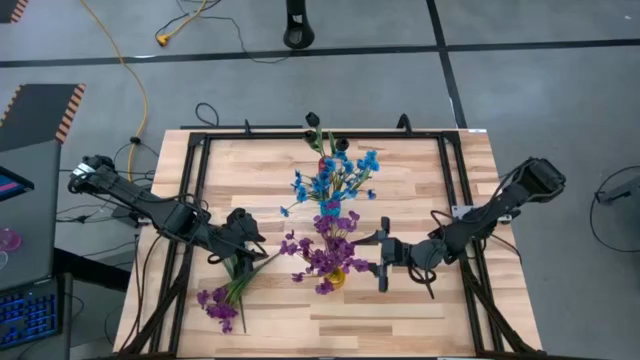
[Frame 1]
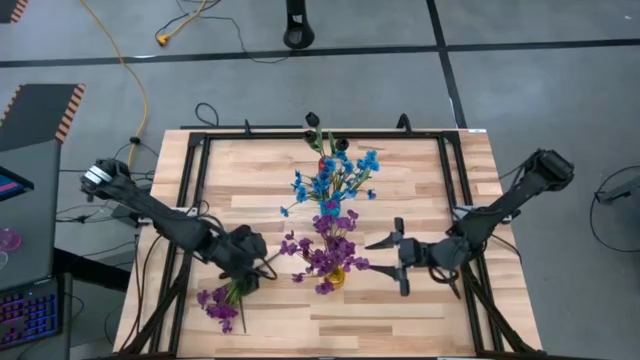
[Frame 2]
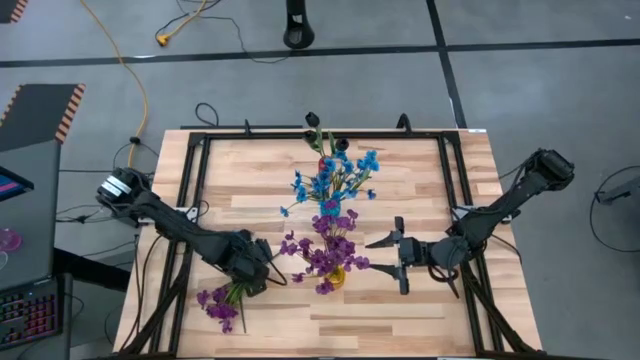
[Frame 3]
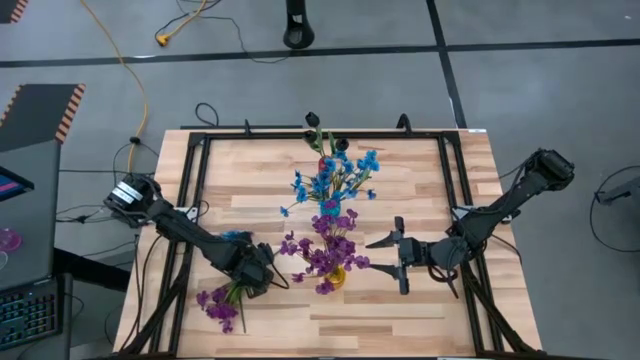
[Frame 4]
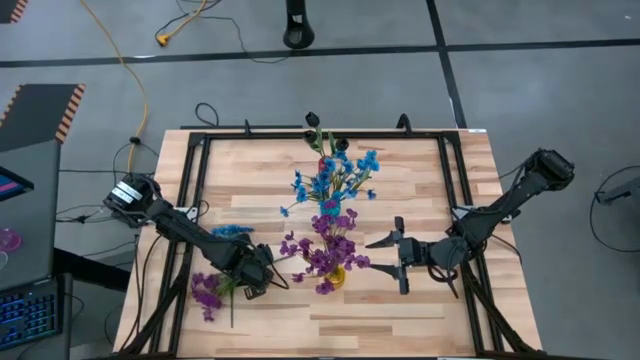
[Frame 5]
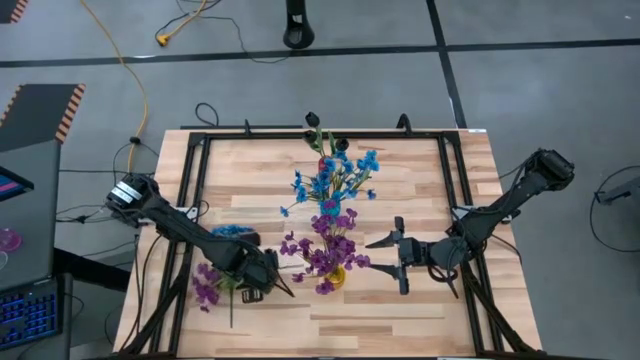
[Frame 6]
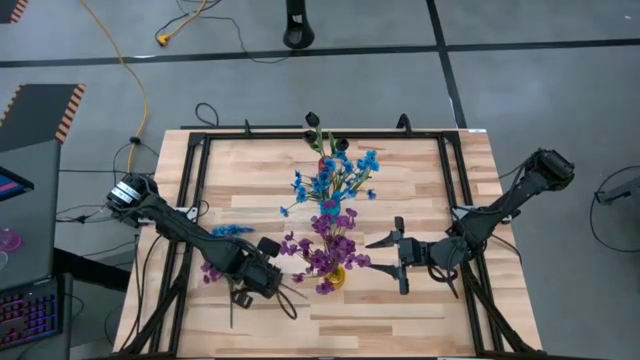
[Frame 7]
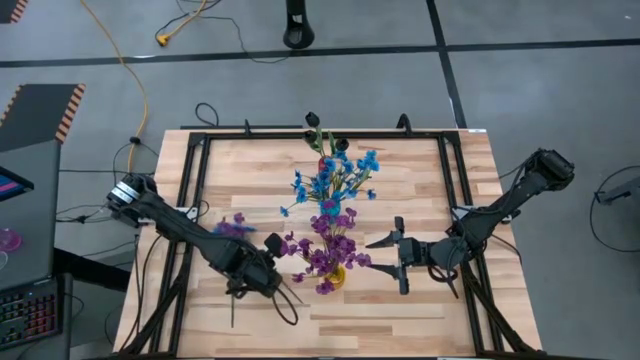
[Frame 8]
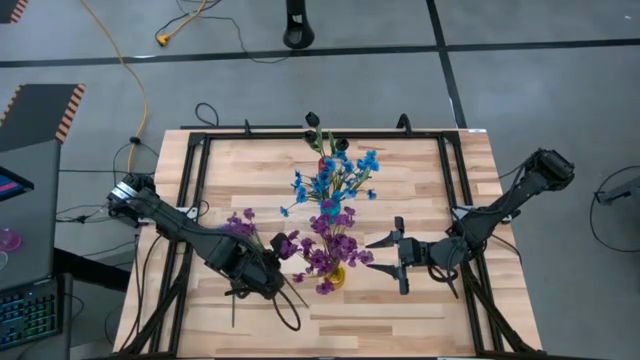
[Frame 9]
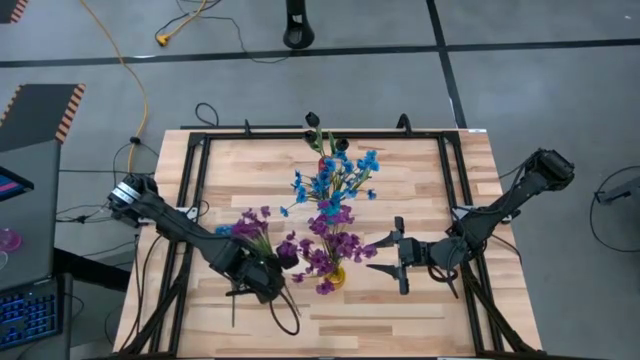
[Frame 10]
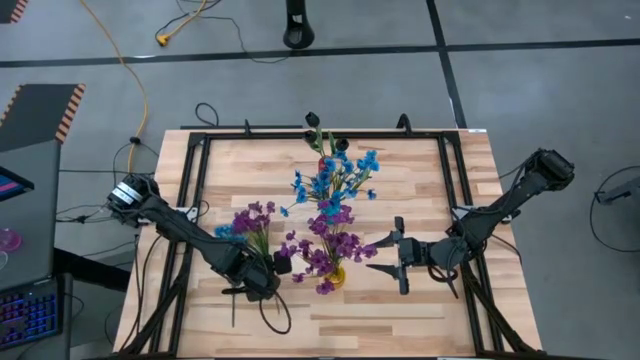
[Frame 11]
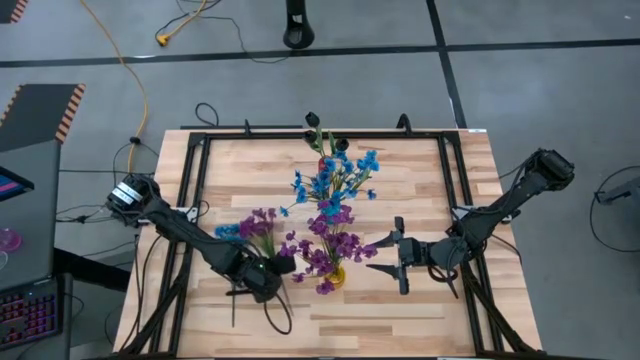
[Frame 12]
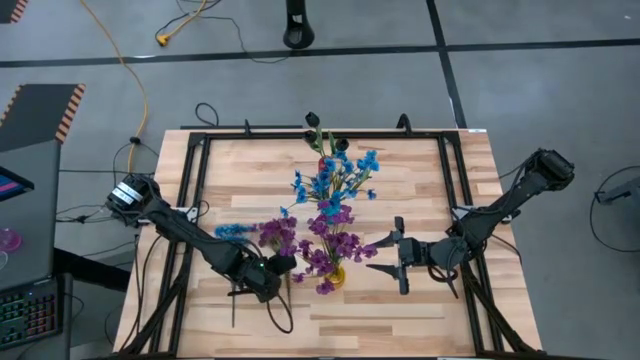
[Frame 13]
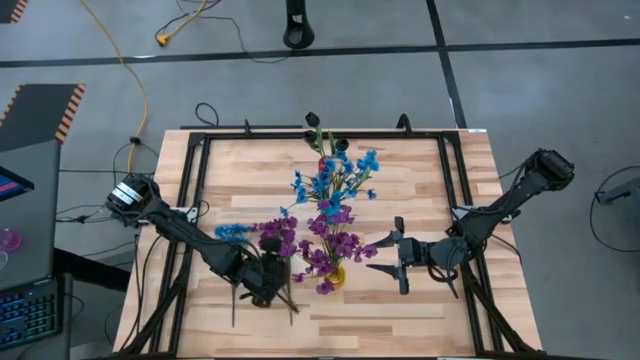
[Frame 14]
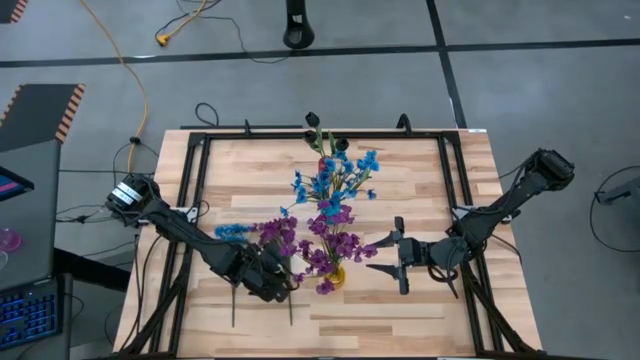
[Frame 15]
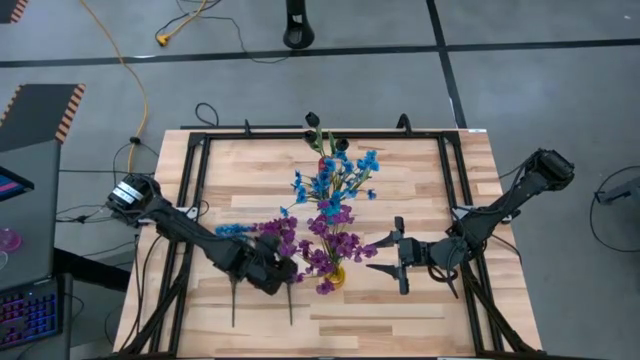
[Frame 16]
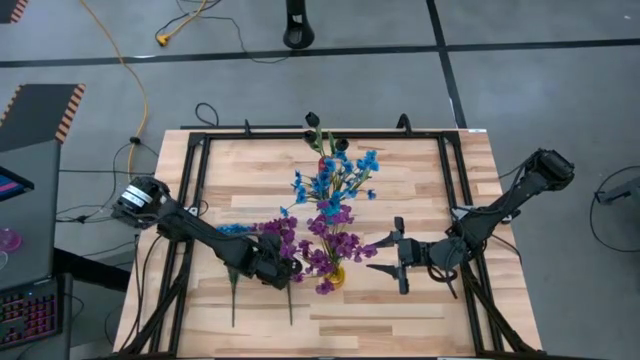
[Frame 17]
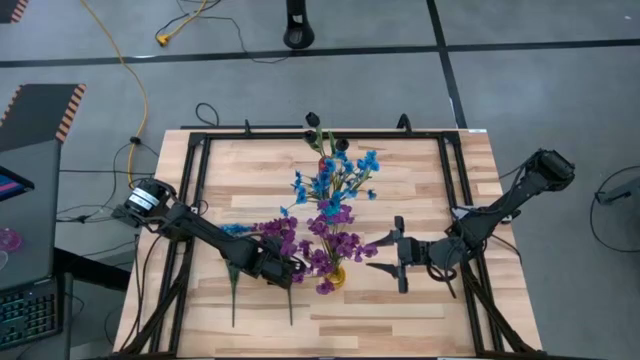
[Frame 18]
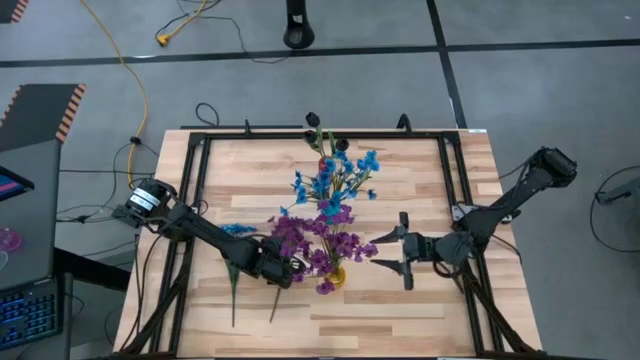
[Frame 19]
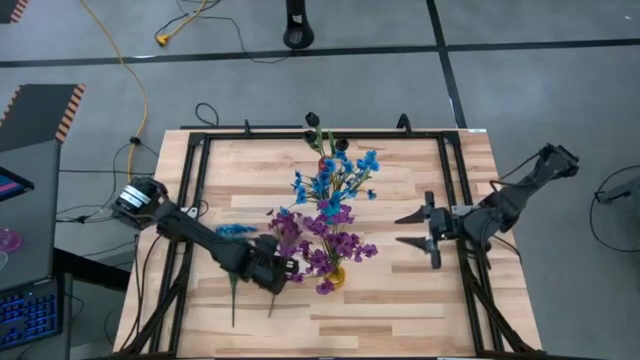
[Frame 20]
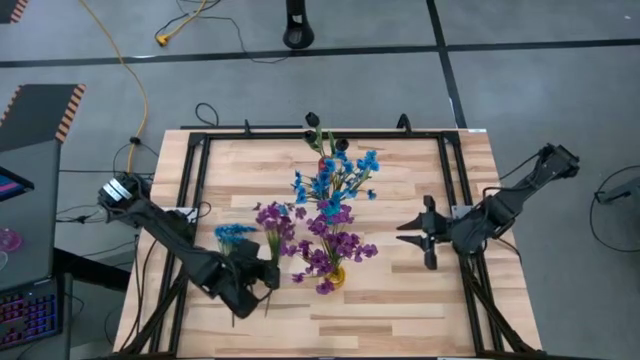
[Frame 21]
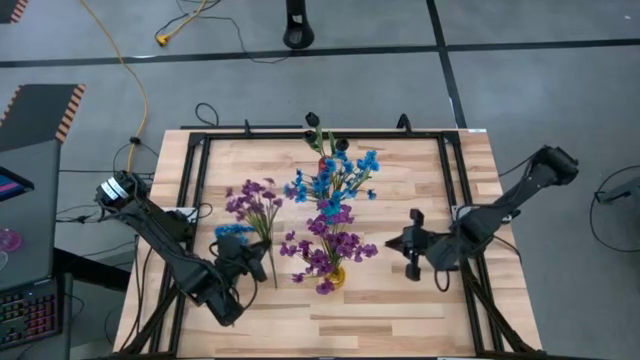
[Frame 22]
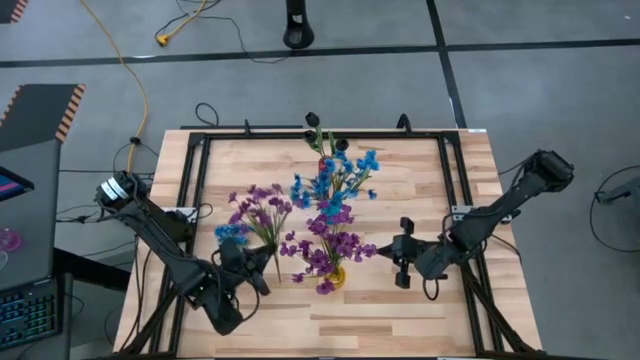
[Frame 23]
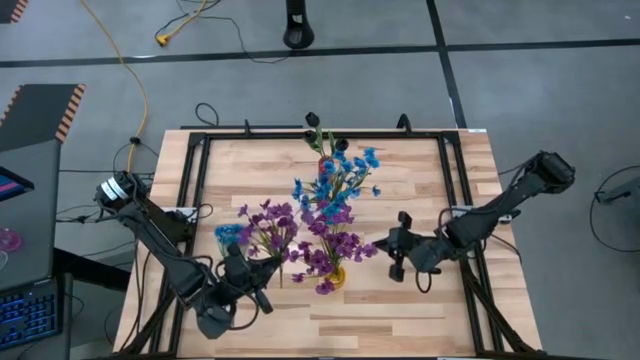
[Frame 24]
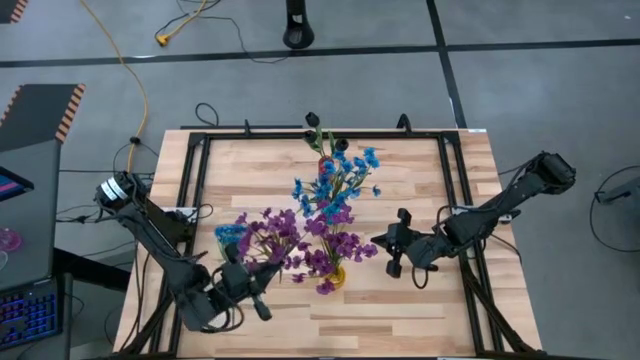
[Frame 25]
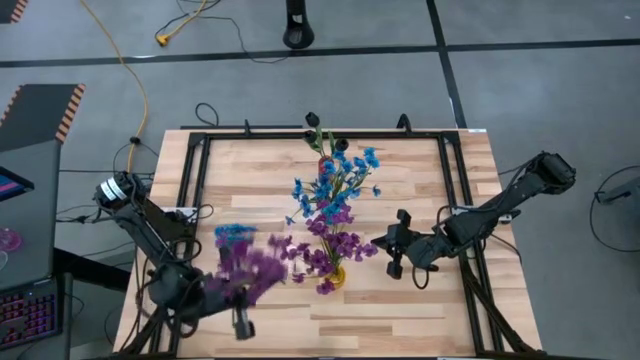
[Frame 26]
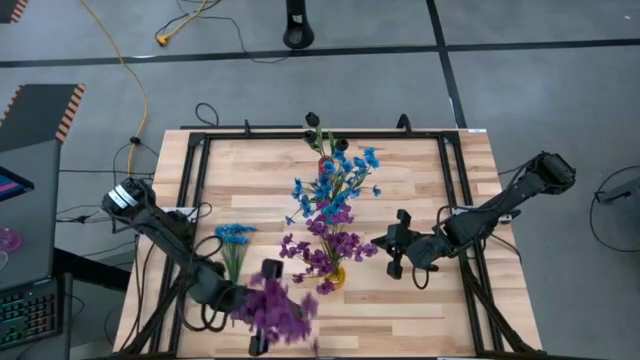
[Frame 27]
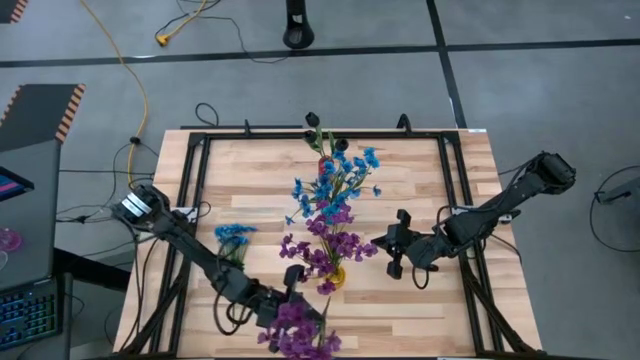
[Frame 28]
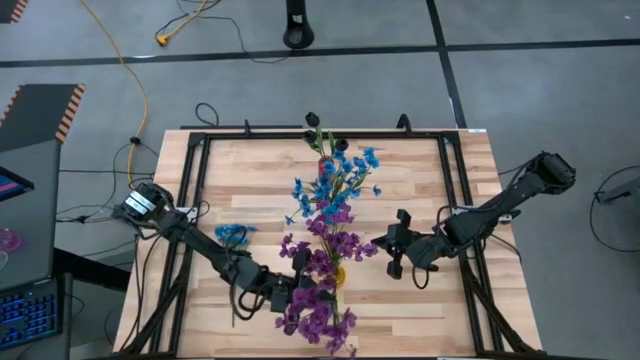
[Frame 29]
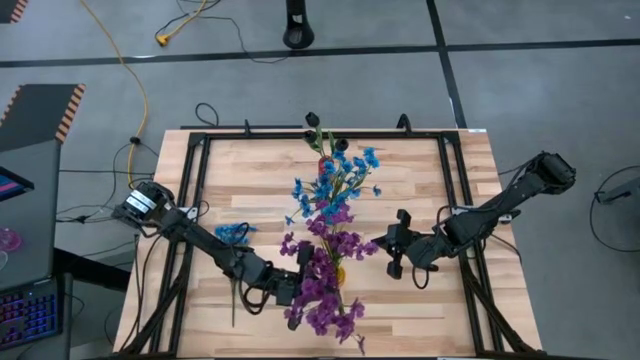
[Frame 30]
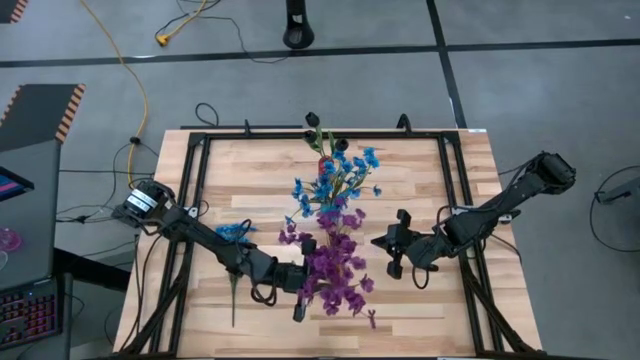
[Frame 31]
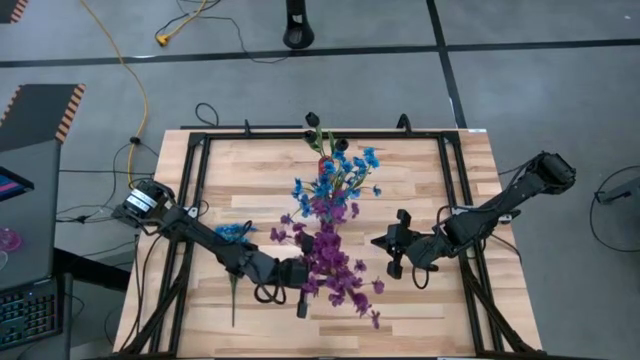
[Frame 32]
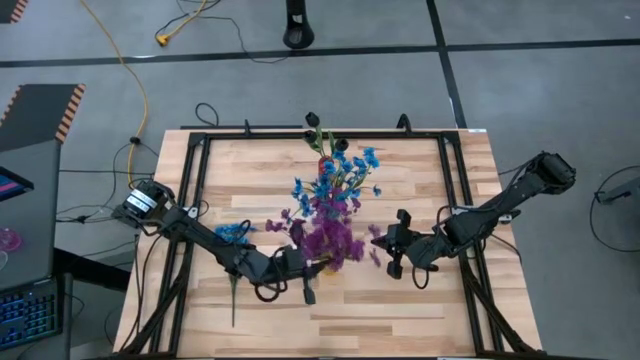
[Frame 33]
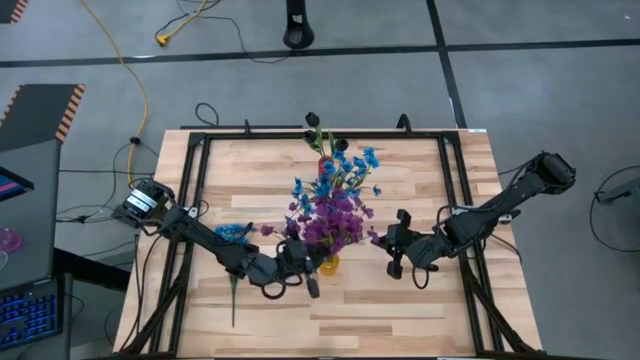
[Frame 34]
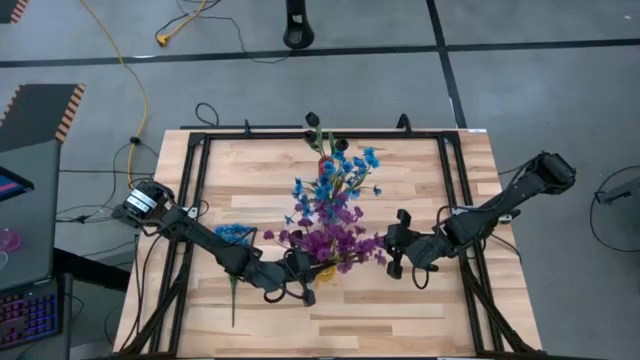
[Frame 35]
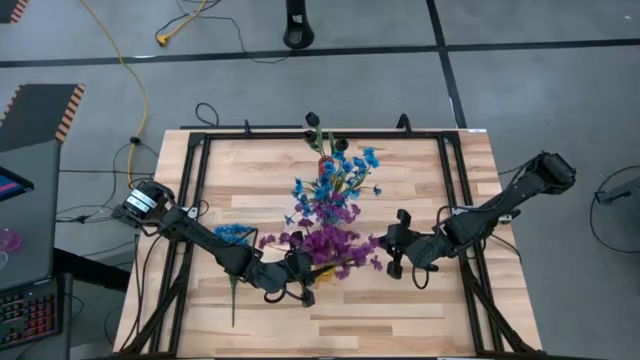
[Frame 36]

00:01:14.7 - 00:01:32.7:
Task: Sort flowers into vase by color
Put the violet flower into the yellow crystal vase

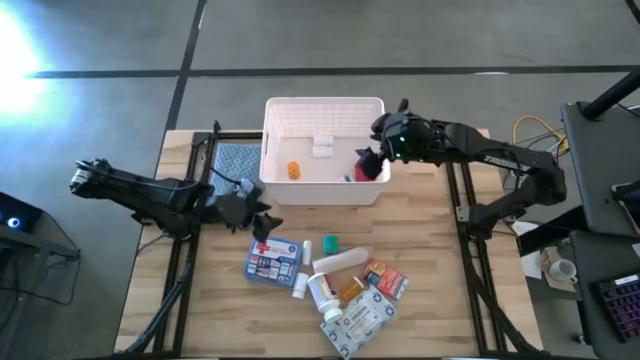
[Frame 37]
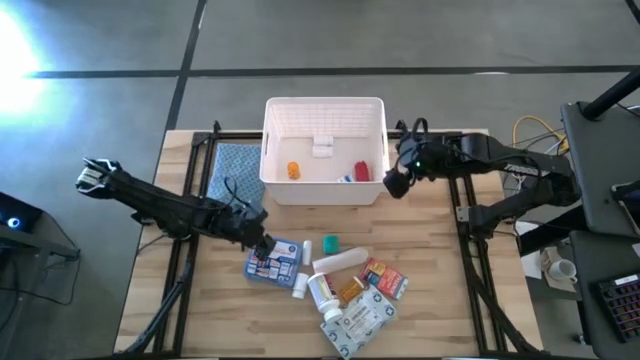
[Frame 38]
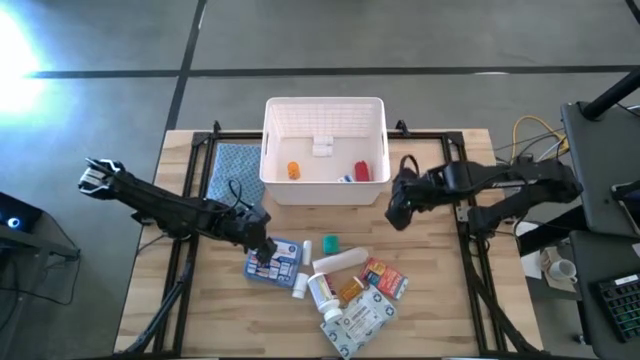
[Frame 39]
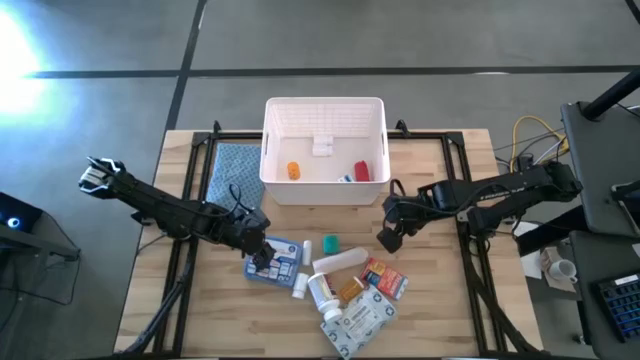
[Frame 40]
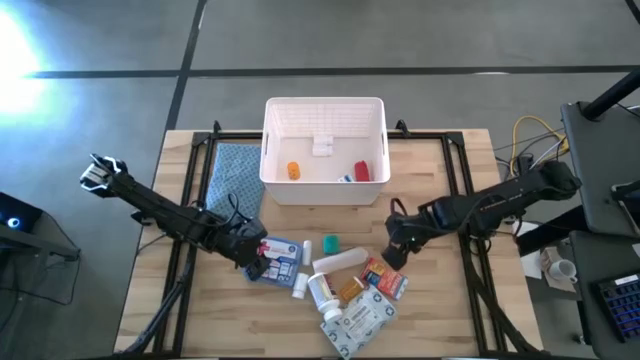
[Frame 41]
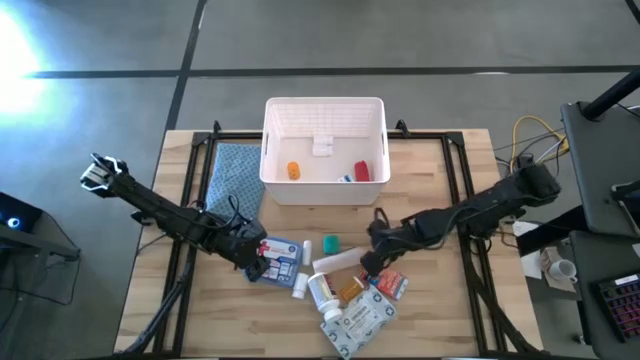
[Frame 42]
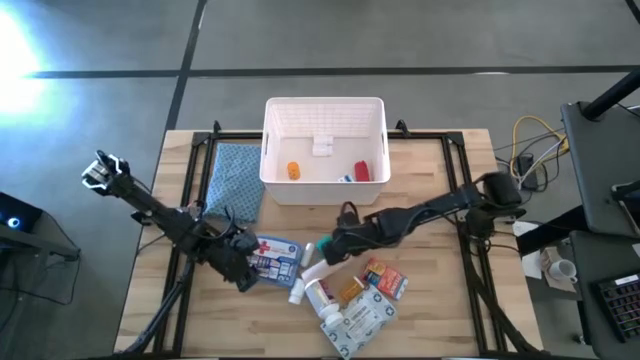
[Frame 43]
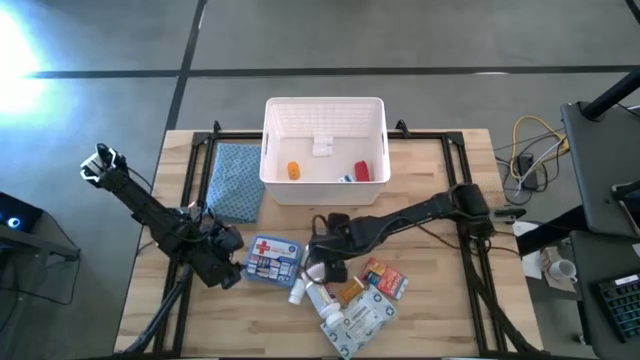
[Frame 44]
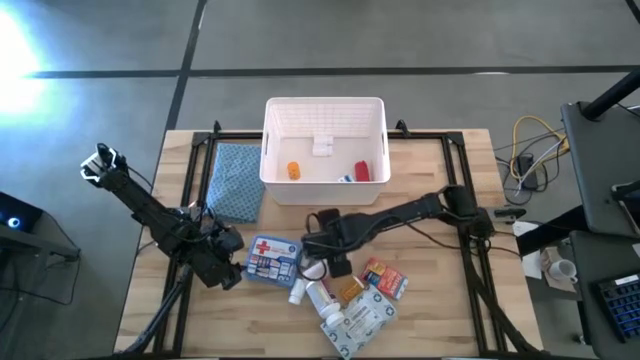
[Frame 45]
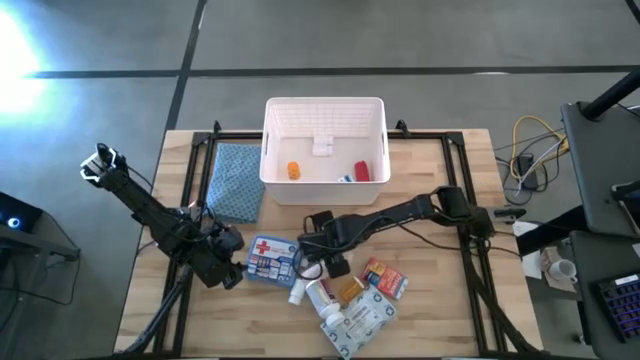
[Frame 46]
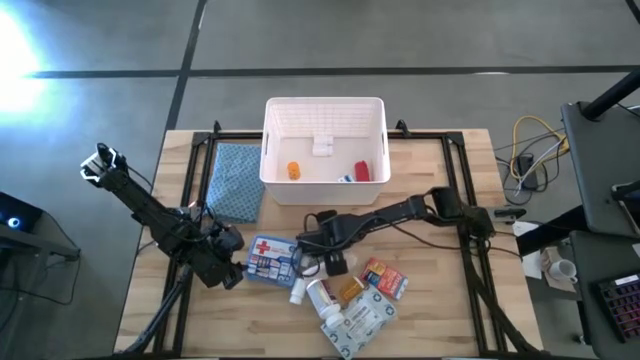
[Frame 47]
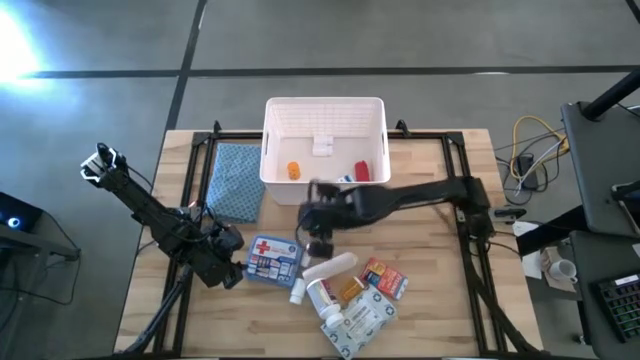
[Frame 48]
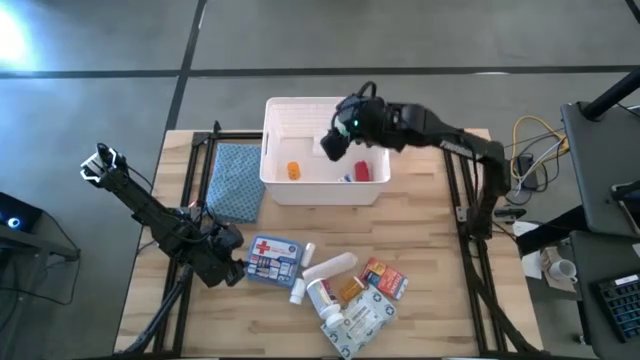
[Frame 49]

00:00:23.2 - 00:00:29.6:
Task: Pick & place medical supplies in basket/bin
Put the green bandage wrap into the white bin
